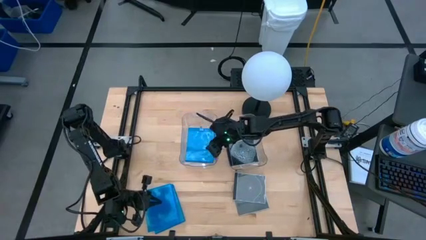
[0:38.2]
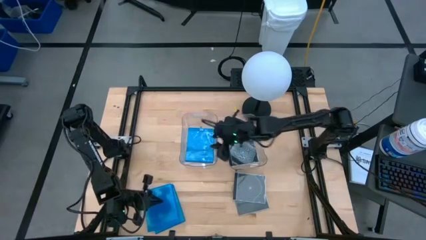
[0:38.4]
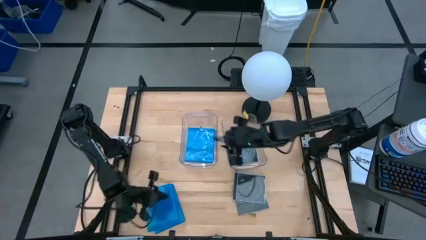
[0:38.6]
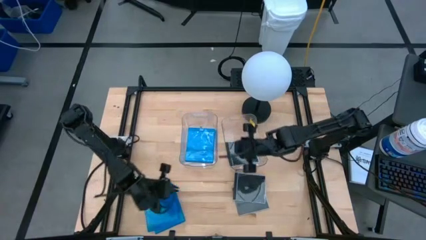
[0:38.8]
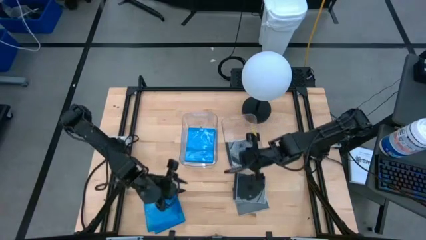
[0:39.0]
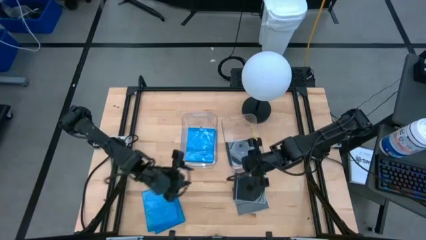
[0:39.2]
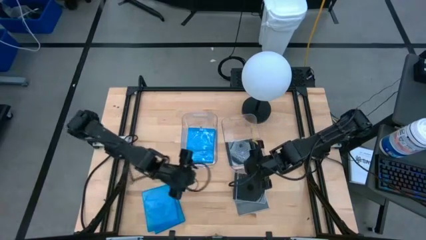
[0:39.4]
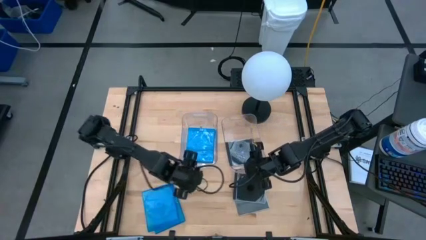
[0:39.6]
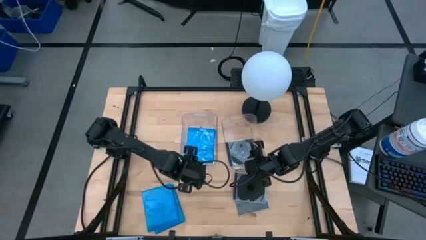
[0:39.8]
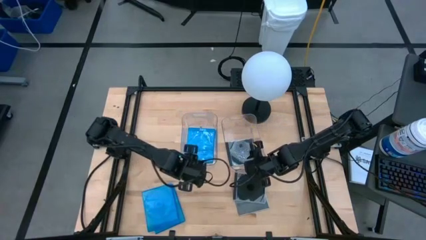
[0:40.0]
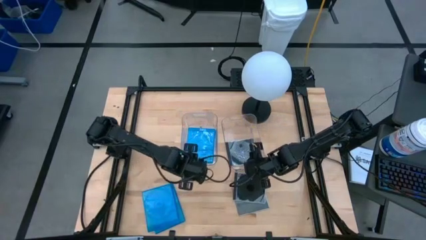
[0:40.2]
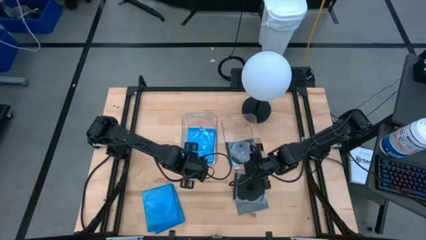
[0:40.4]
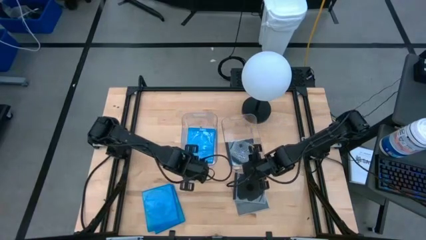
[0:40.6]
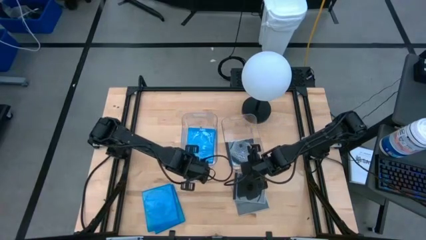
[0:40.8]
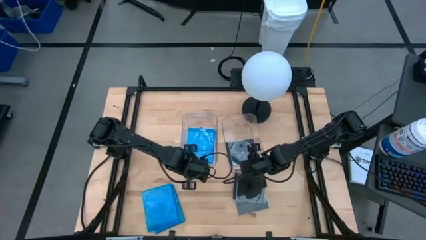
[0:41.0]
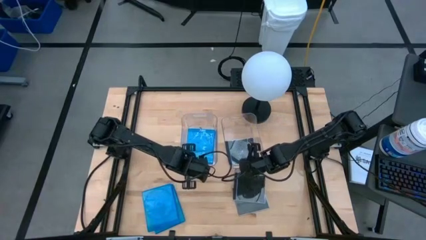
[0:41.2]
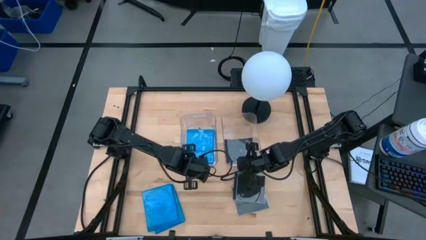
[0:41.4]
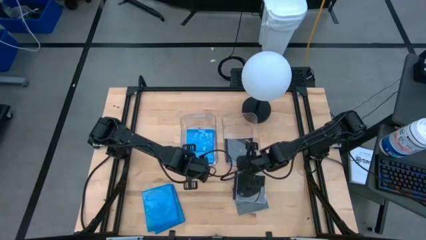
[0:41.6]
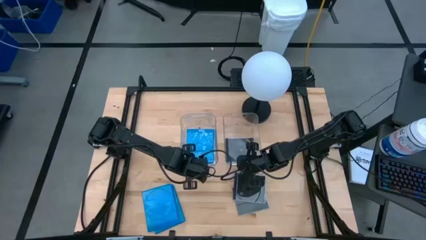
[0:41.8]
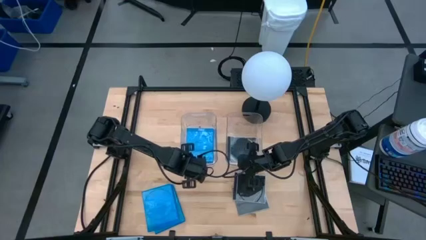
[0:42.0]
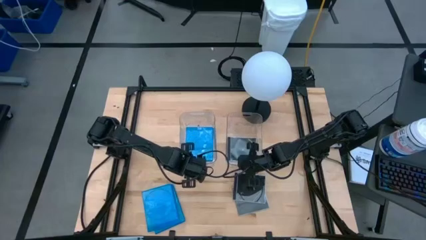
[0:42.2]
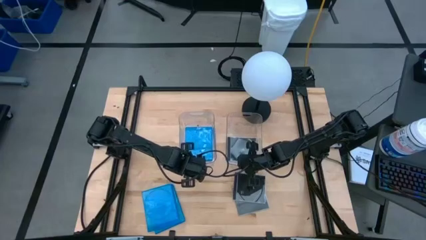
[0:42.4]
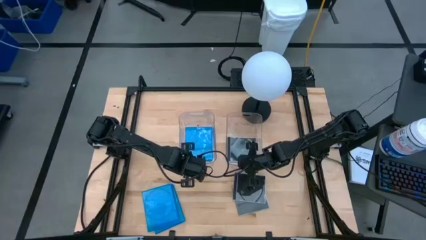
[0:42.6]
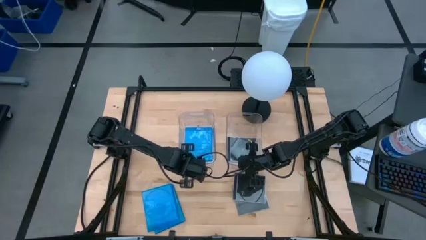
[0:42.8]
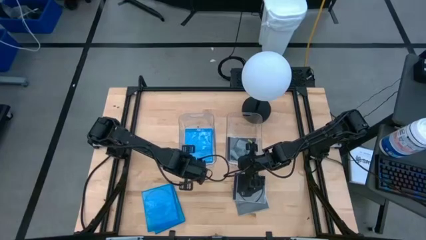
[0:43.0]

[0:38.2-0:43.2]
Task: Pick & place jewel cases by type
Adjust the transparent bins

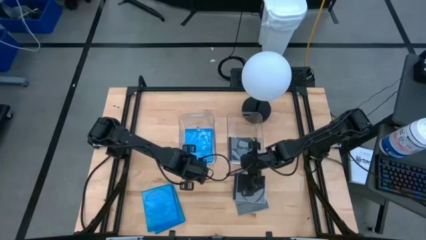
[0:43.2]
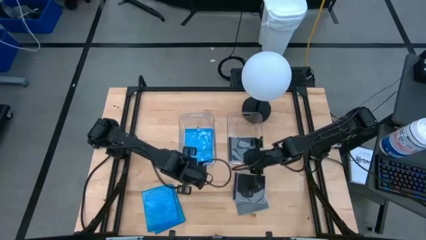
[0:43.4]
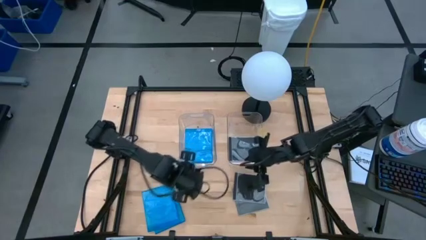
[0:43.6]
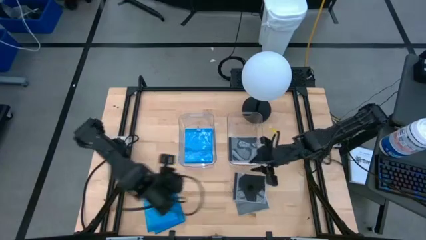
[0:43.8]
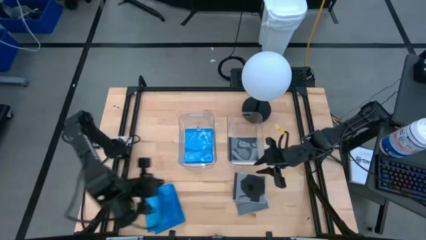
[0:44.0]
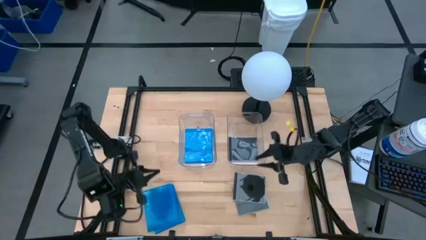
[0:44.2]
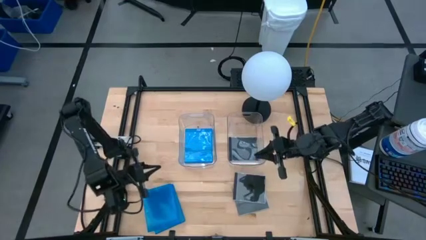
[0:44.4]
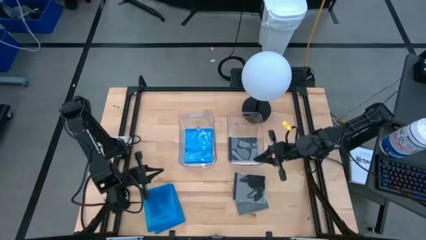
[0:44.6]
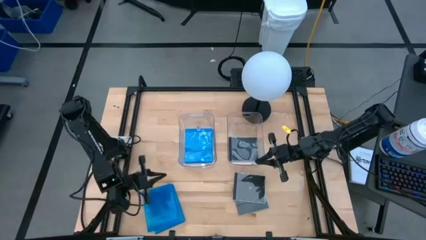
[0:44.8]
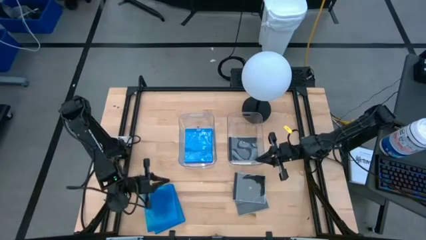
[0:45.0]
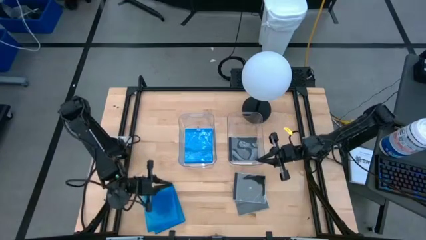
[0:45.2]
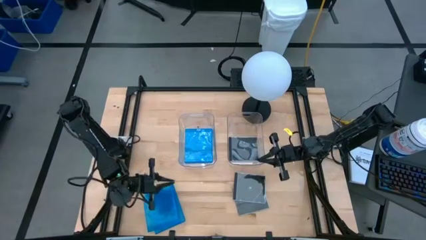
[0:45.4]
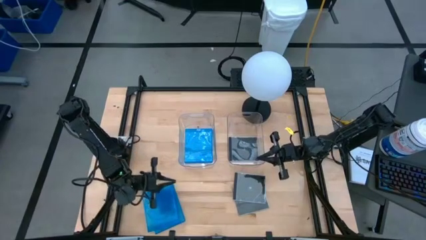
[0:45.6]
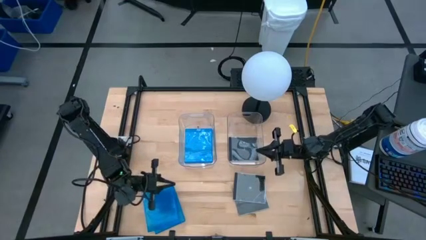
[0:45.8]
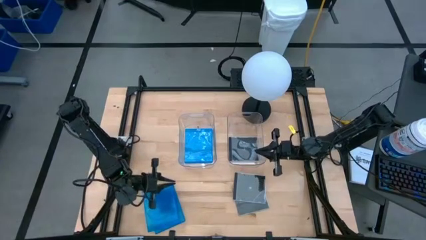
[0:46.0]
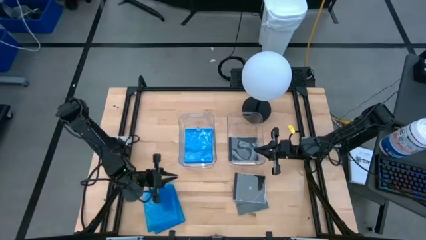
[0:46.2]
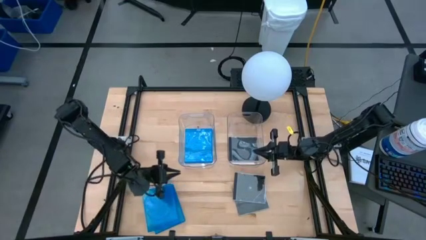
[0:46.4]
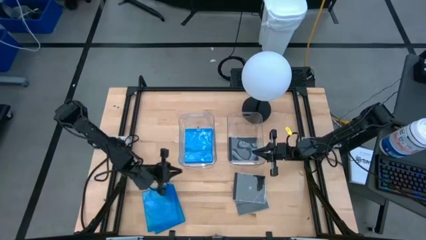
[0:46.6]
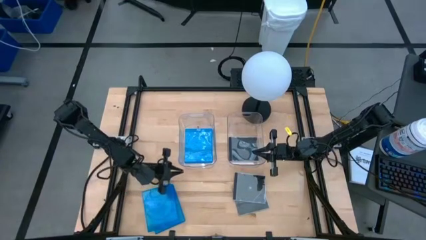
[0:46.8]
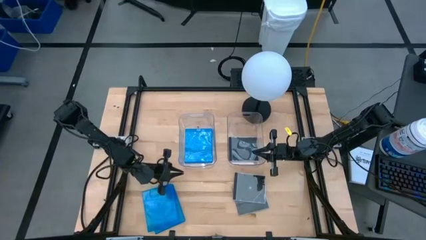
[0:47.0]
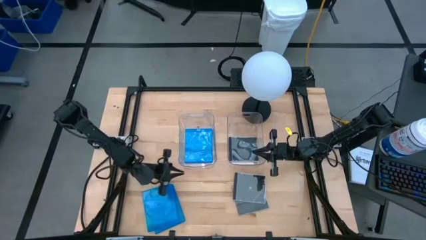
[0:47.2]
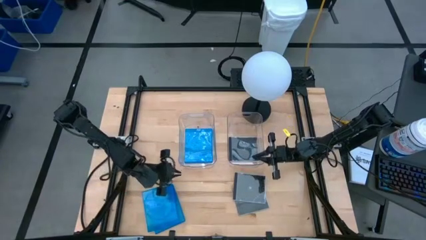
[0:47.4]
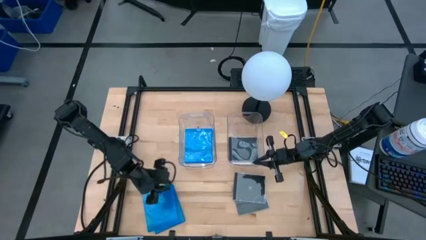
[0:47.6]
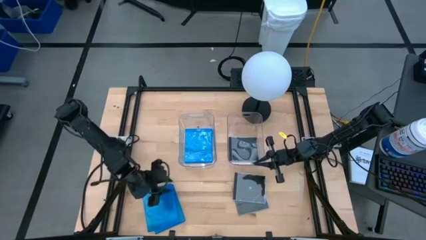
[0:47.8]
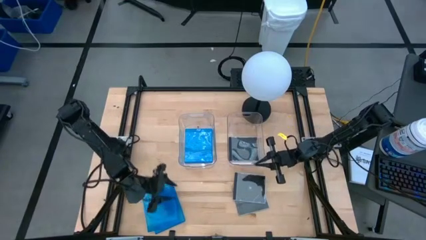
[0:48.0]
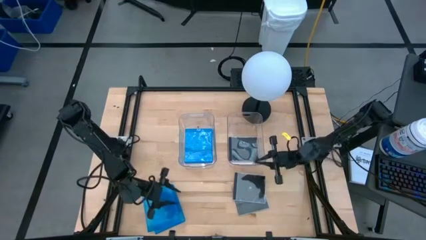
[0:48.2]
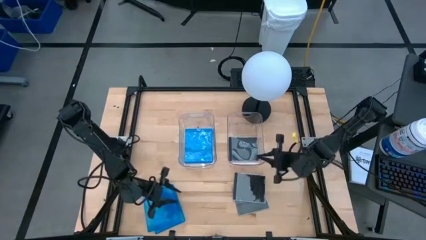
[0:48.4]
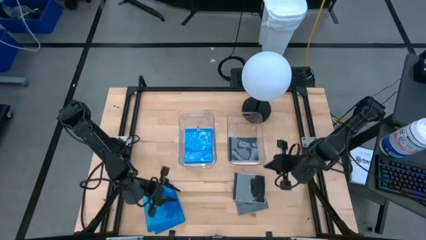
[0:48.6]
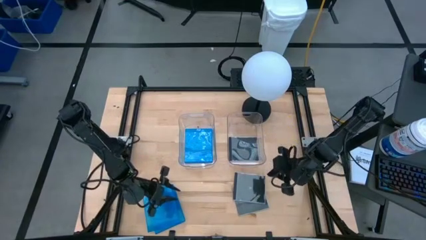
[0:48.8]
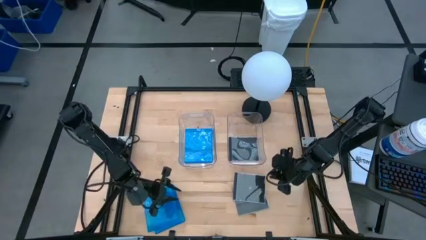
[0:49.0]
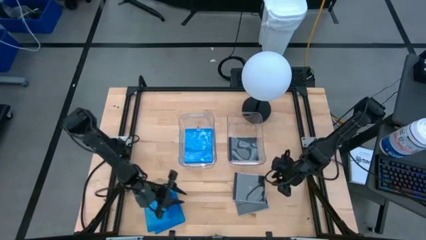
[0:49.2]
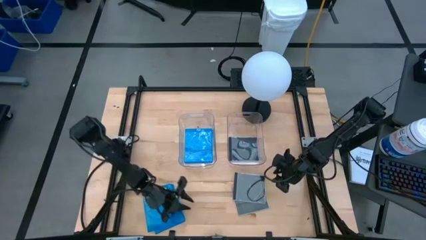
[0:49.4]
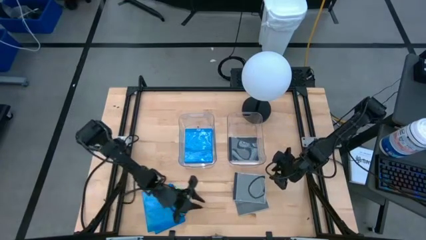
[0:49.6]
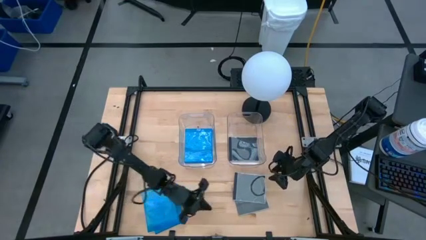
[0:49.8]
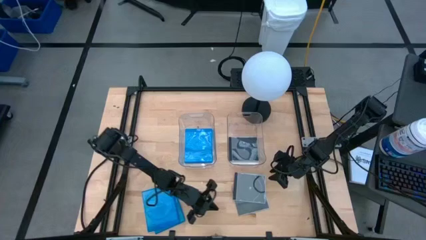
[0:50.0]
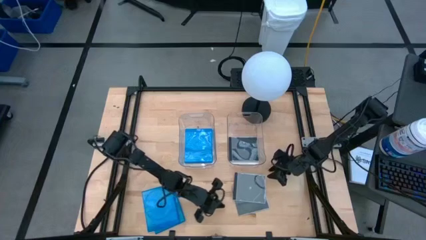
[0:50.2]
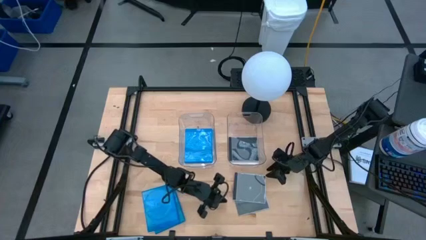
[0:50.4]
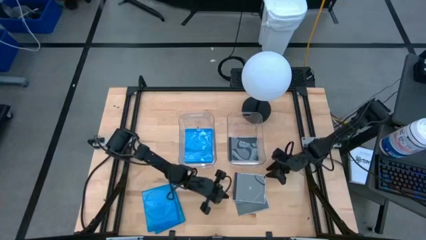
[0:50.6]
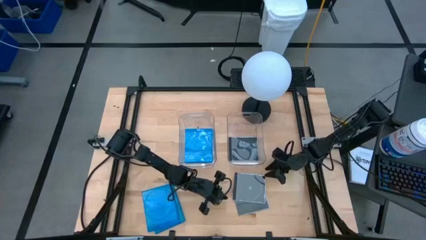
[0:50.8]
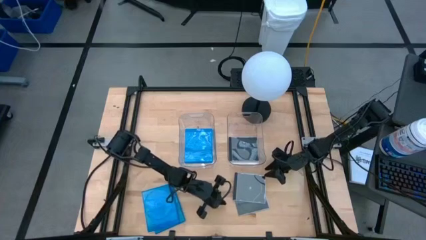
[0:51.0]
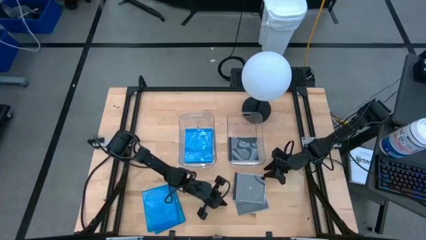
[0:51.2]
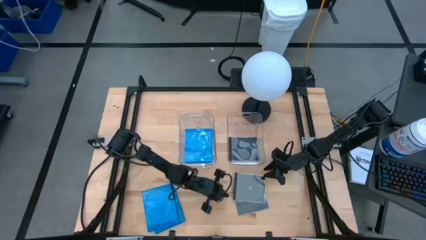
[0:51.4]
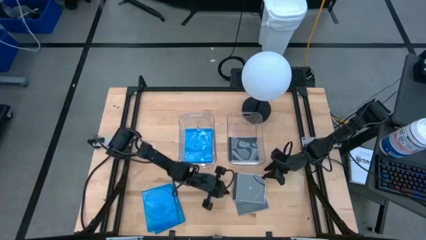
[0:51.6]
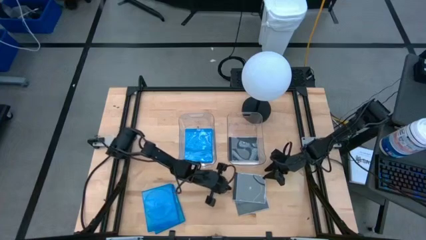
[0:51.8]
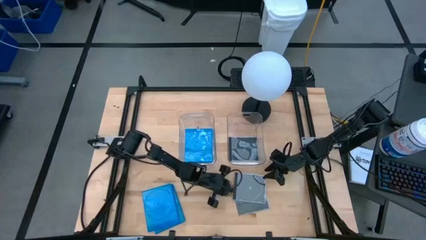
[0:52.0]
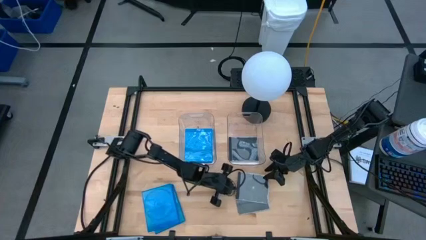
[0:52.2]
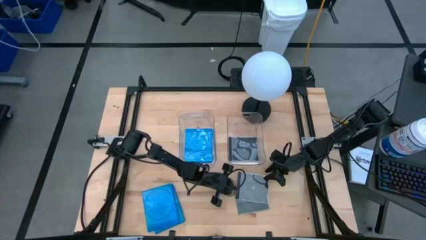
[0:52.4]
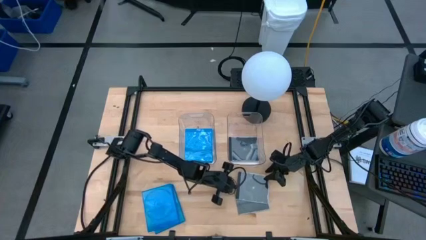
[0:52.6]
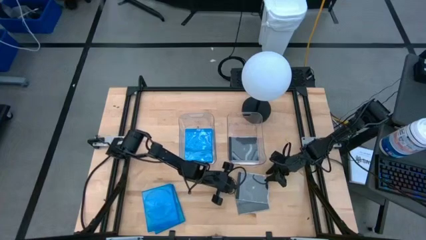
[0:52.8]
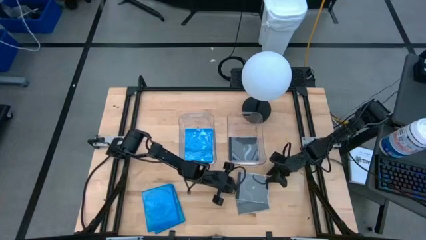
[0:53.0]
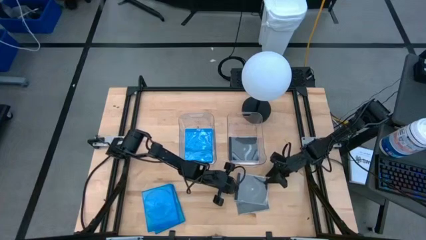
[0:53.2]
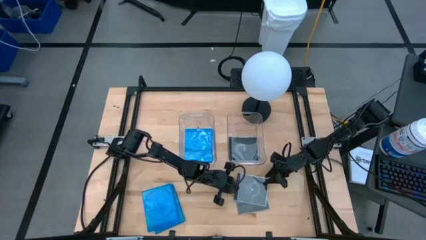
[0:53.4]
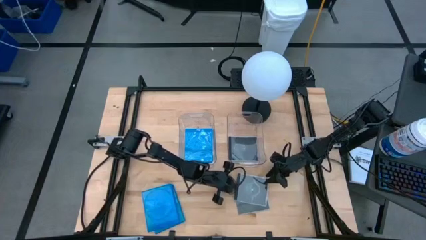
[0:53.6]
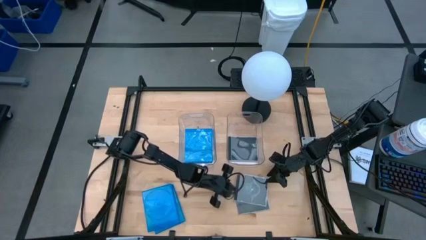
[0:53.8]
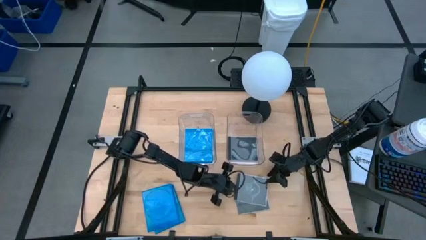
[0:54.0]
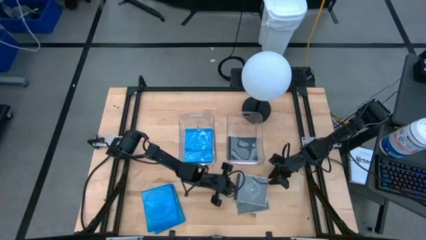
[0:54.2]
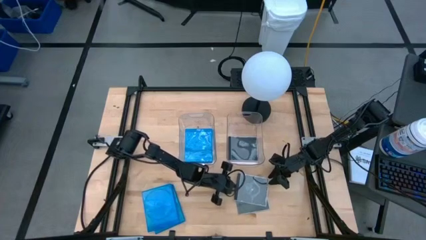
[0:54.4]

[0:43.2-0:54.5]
Put the black cd case into the right transparent bin
